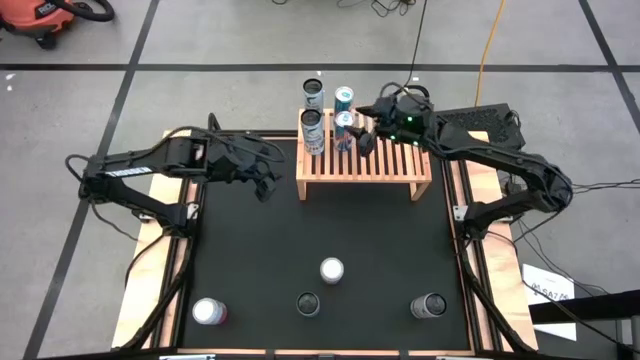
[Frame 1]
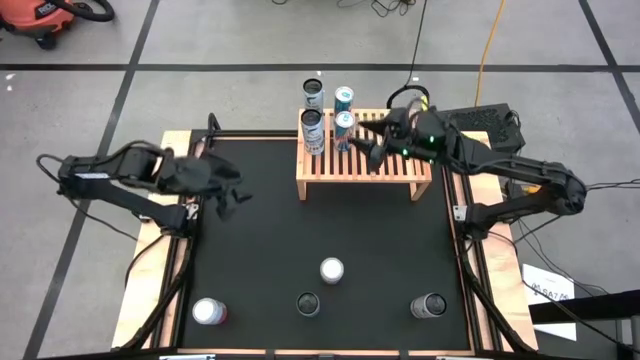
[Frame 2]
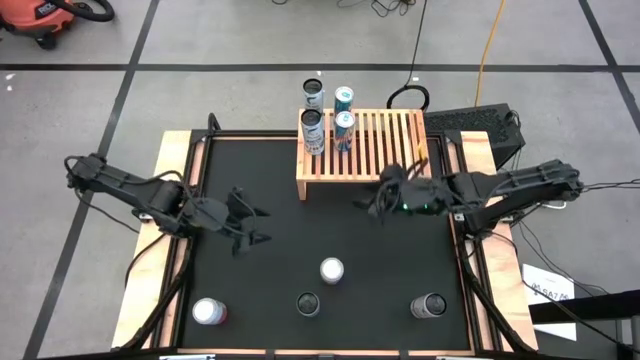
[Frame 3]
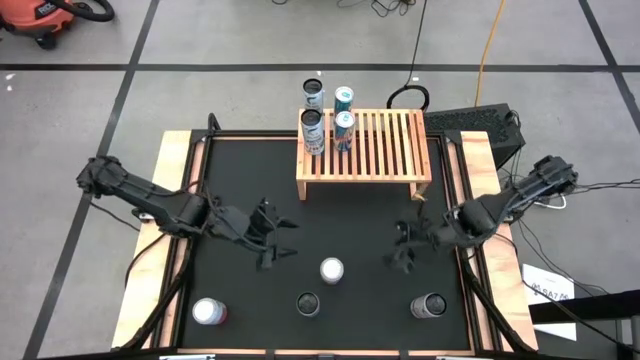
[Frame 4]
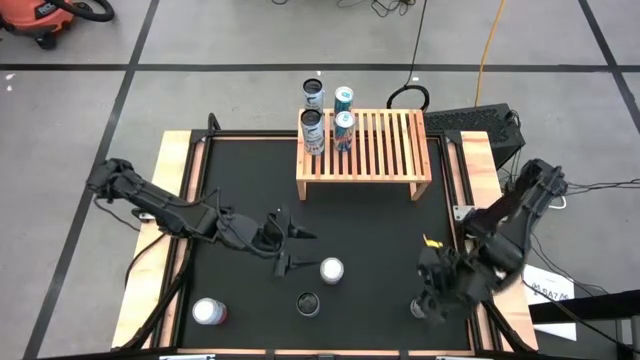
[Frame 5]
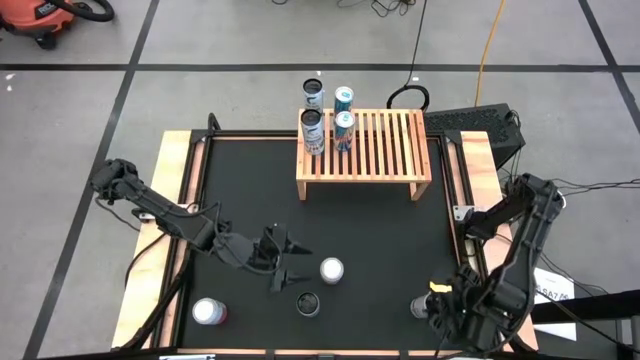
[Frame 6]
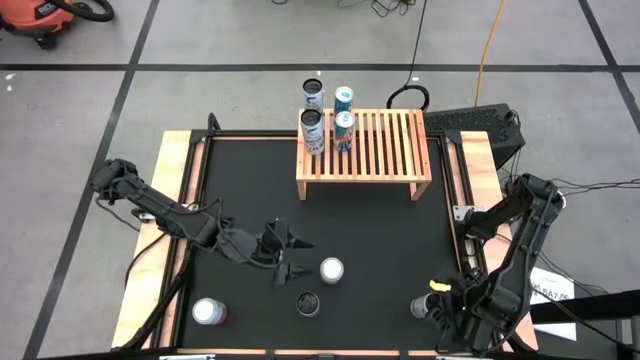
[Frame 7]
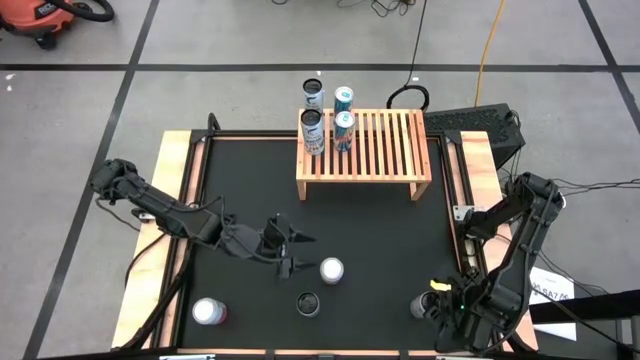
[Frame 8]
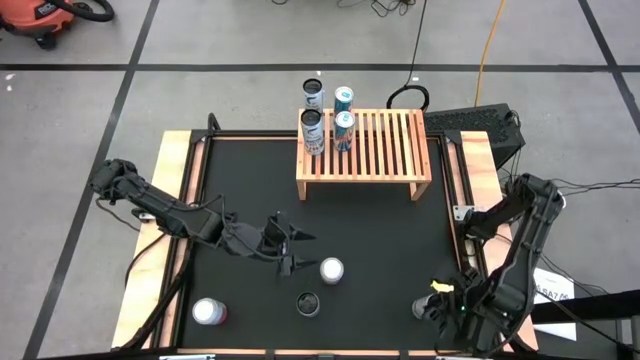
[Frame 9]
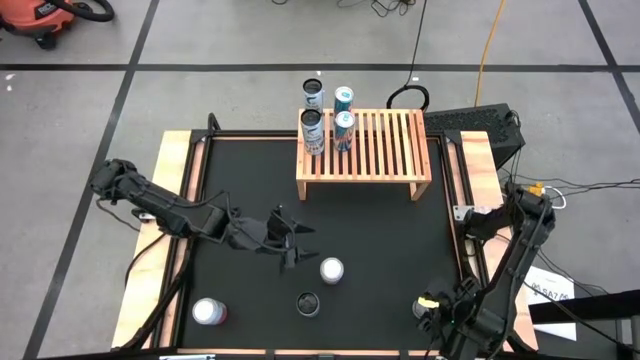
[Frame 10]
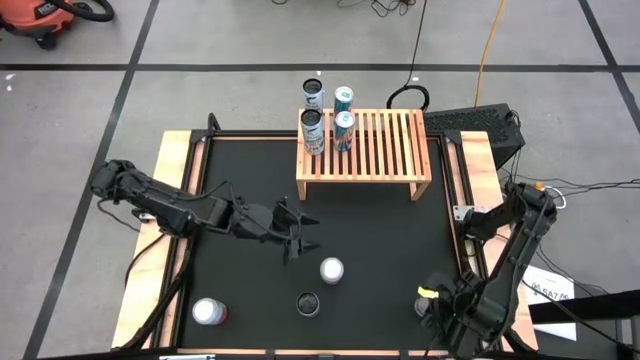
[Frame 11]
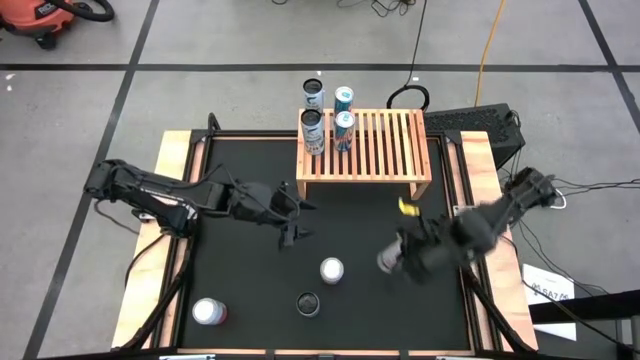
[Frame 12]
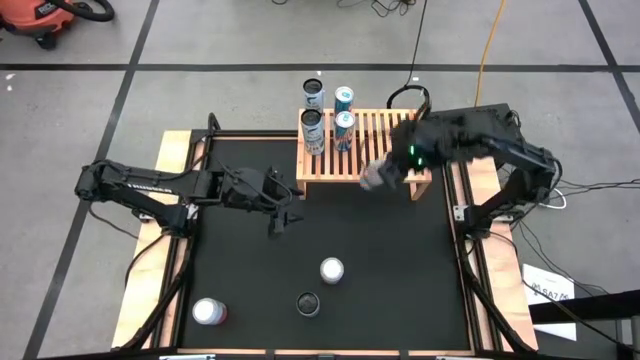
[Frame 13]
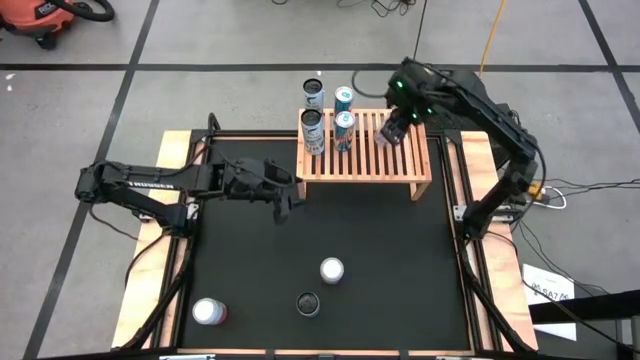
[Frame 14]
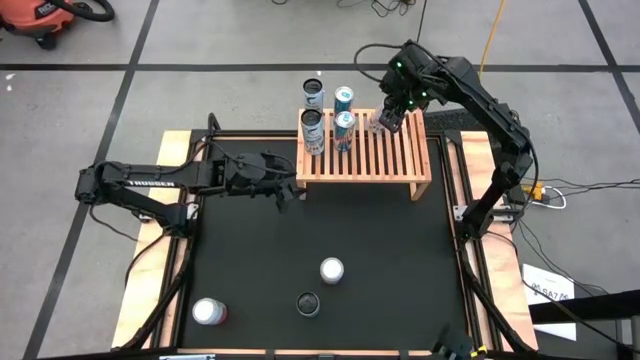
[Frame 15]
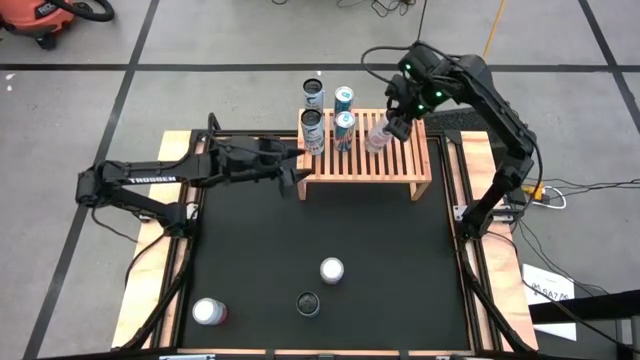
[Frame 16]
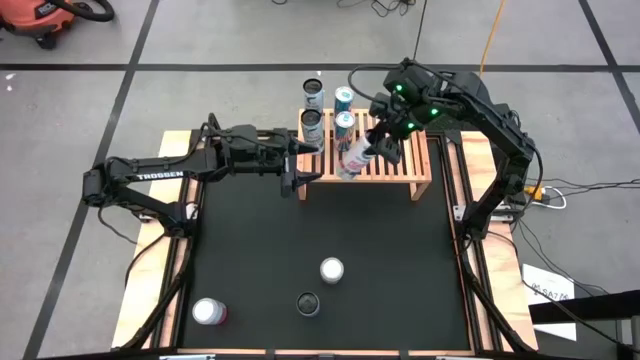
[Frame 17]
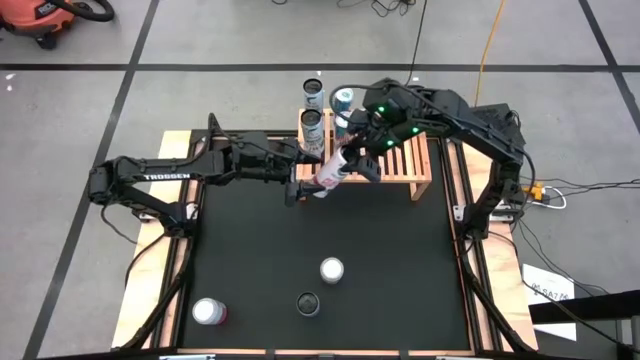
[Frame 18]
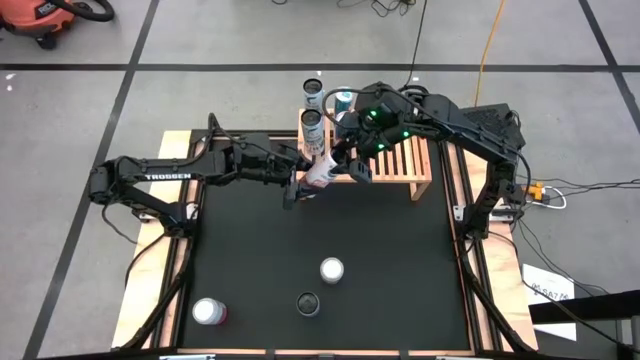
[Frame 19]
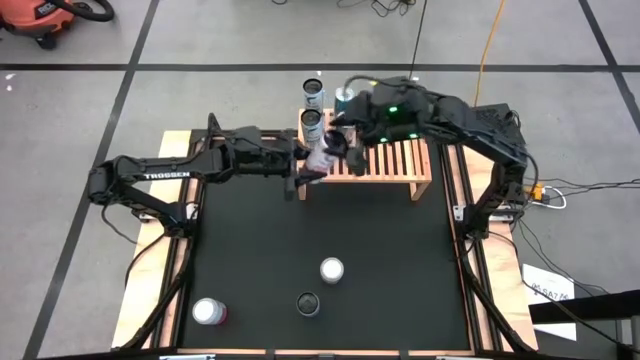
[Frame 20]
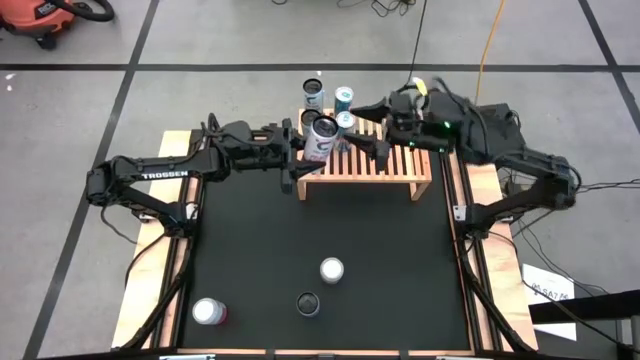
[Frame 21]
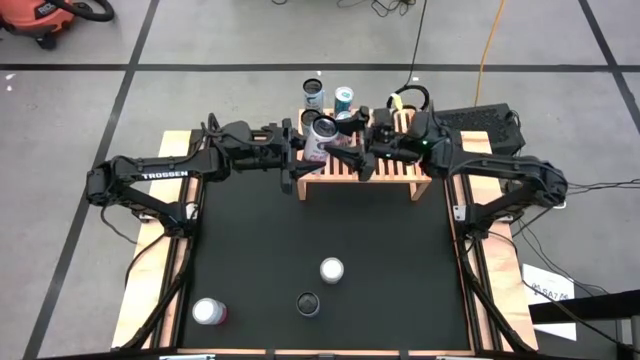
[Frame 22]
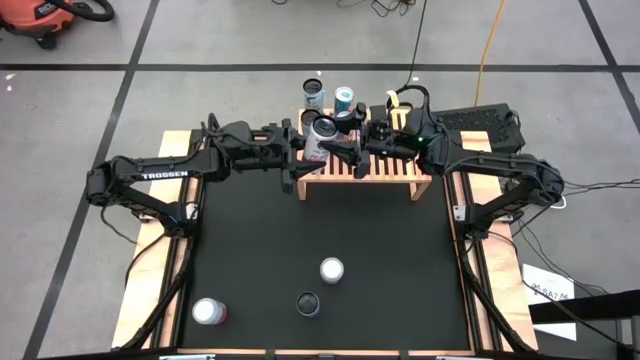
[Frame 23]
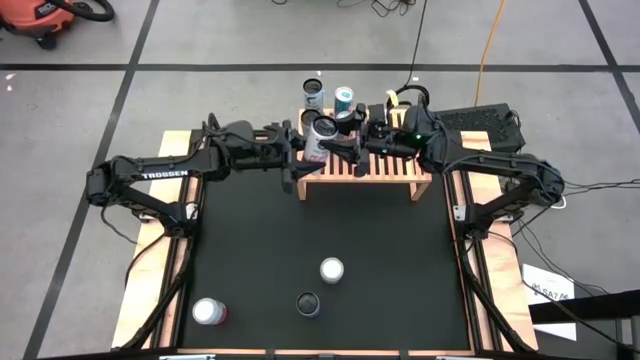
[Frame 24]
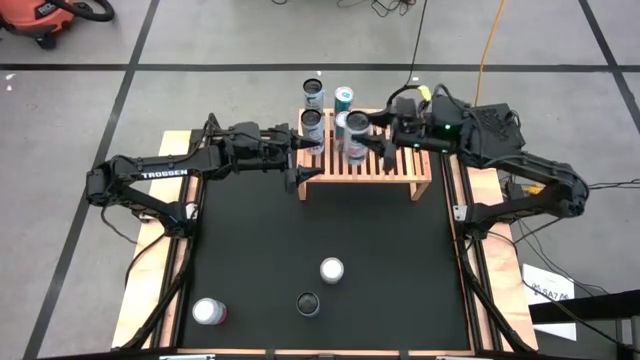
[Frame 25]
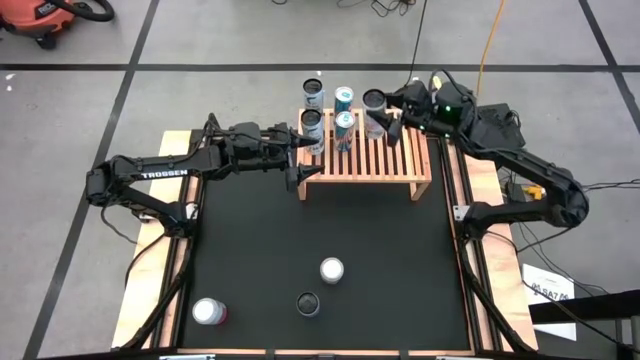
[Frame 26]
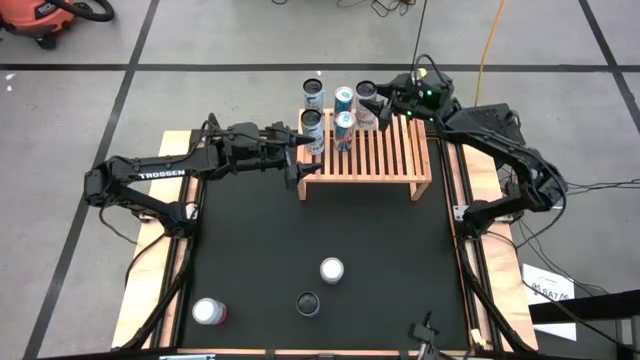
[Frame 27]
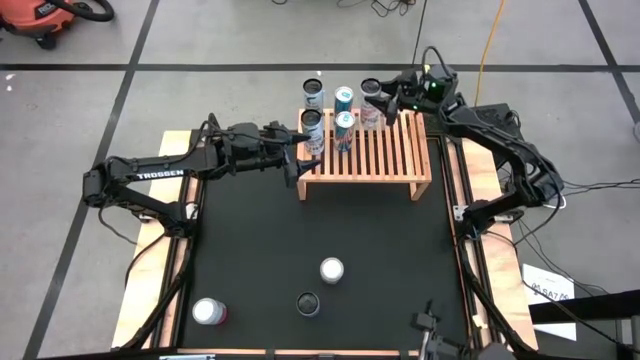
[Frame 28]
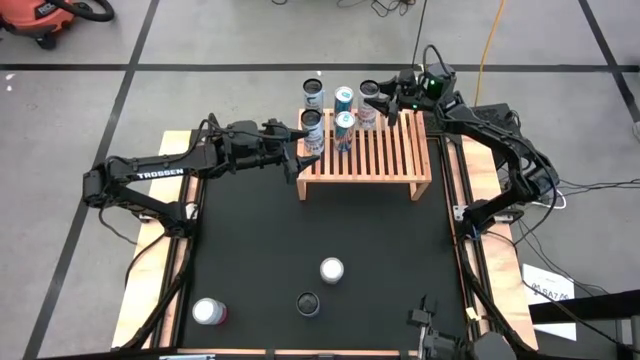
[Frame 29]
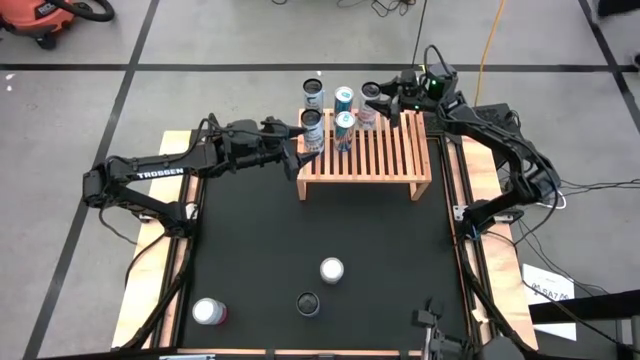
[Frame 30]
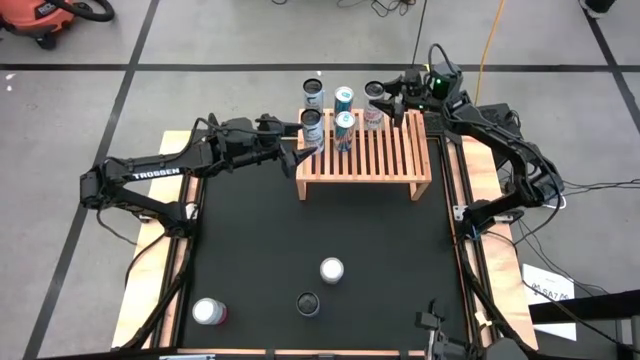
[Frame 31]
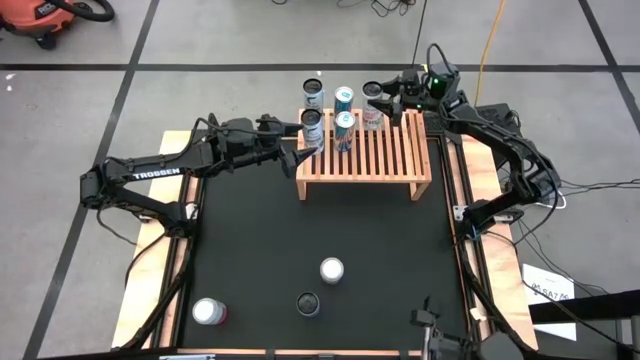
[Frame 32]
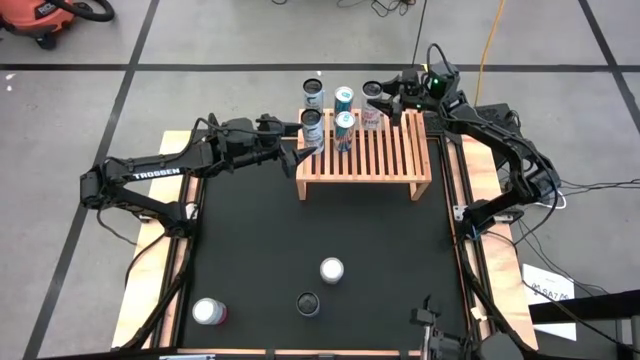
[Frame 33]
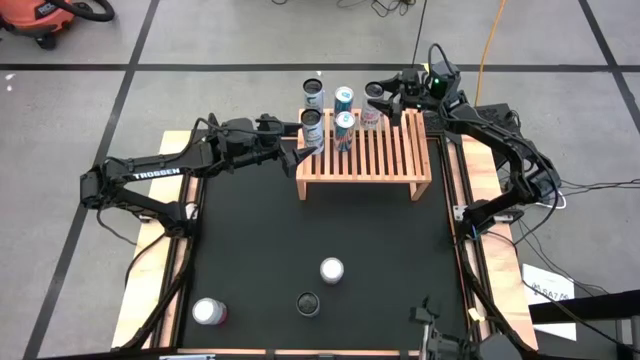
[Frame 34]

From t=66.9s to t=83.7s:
Task: Place canned beverage on shelf
Put the pink soda can on the shelf
